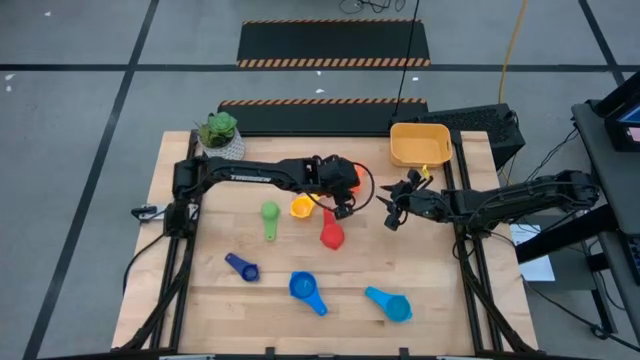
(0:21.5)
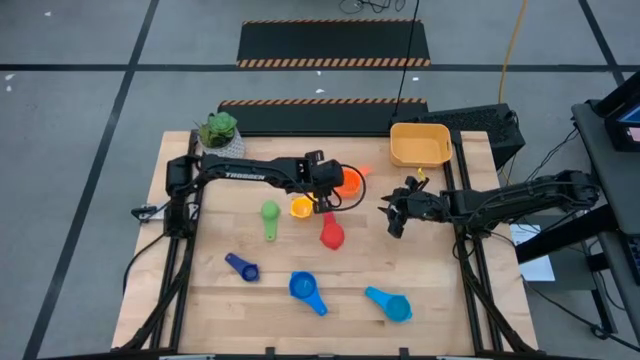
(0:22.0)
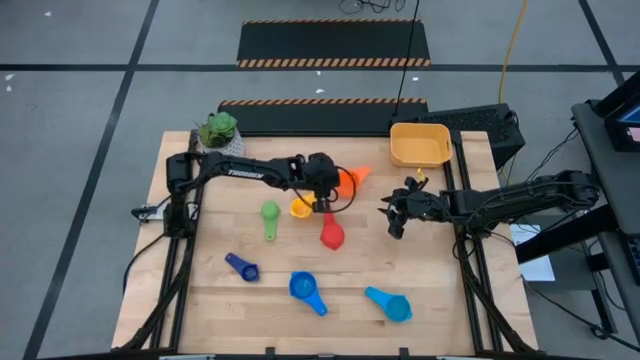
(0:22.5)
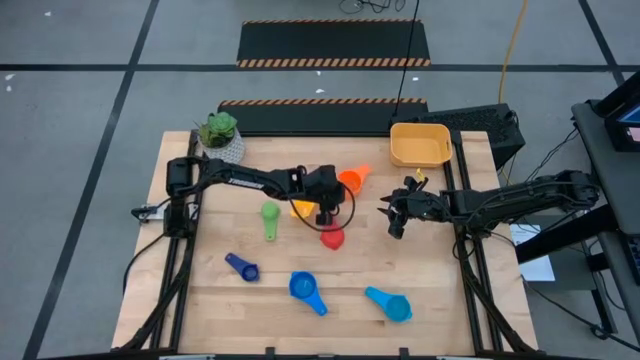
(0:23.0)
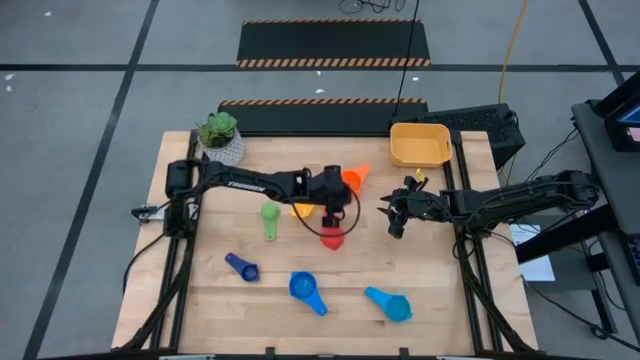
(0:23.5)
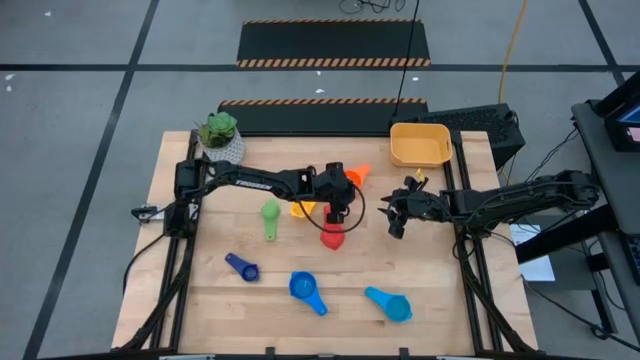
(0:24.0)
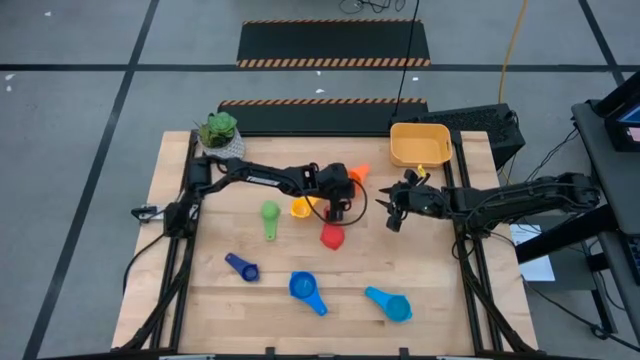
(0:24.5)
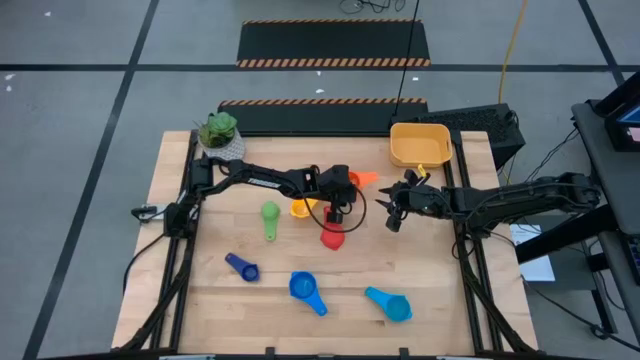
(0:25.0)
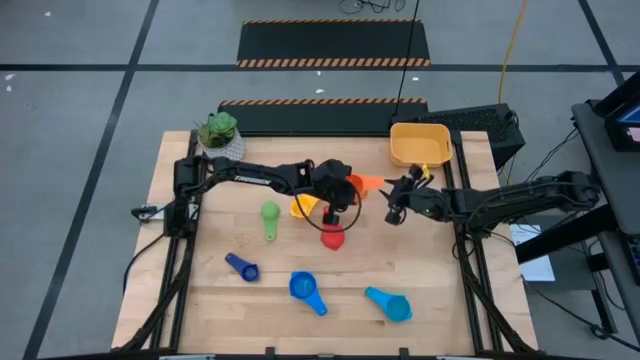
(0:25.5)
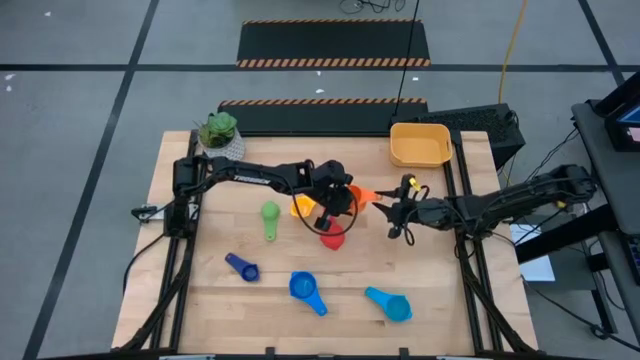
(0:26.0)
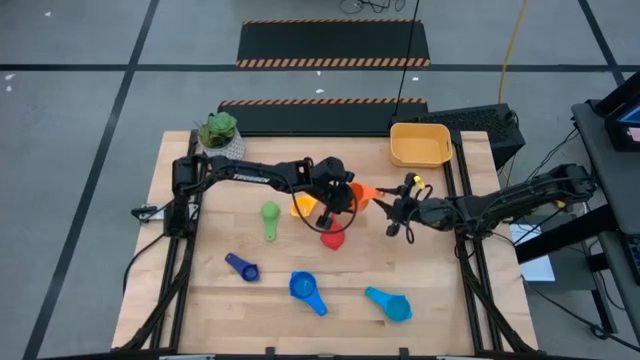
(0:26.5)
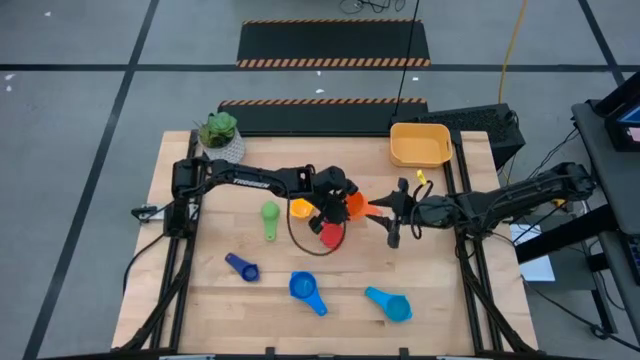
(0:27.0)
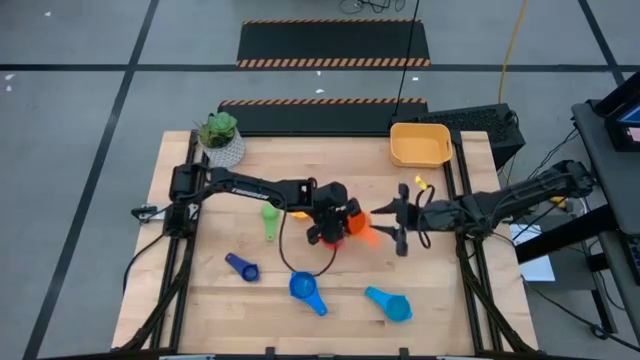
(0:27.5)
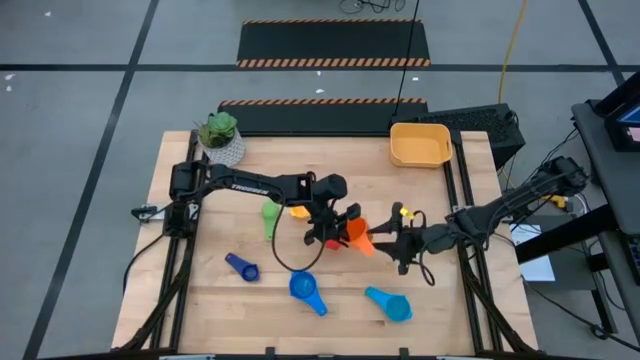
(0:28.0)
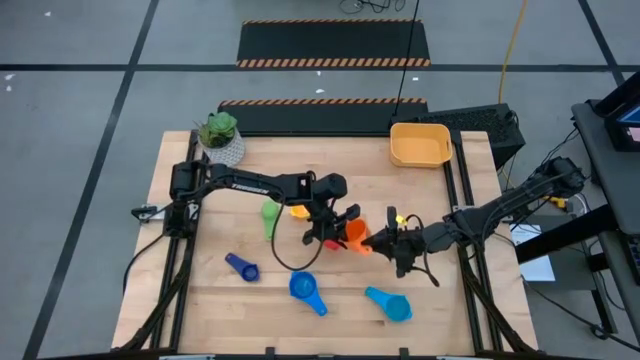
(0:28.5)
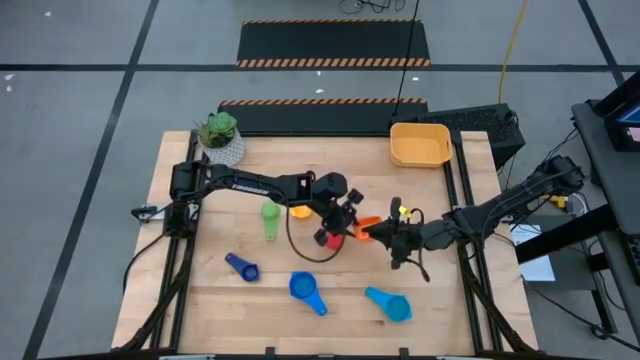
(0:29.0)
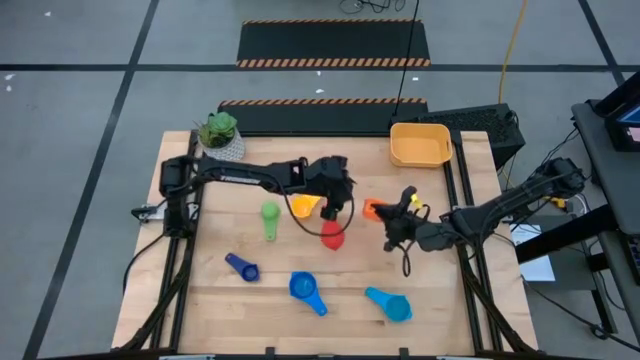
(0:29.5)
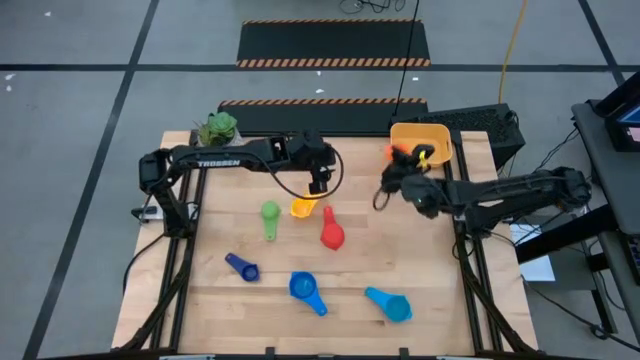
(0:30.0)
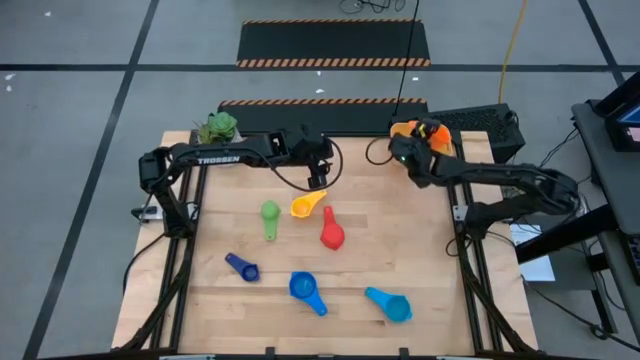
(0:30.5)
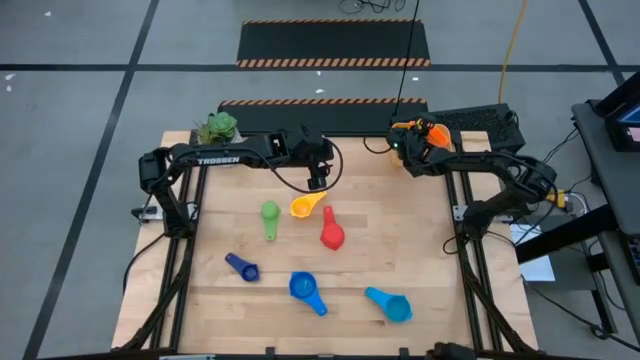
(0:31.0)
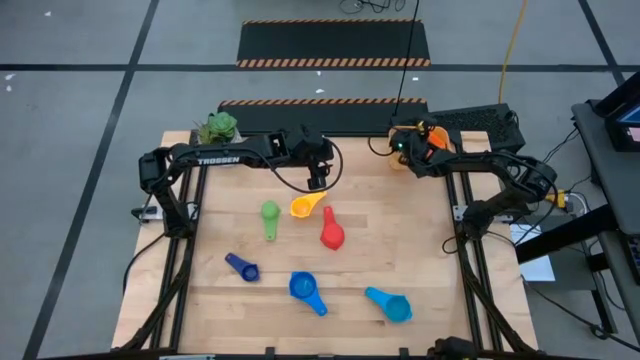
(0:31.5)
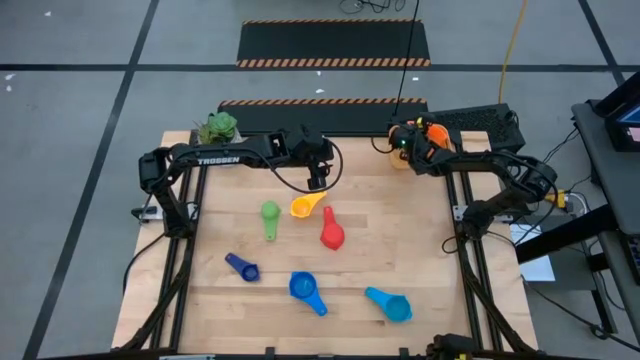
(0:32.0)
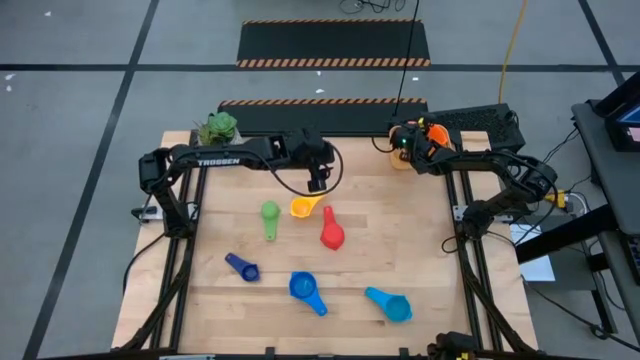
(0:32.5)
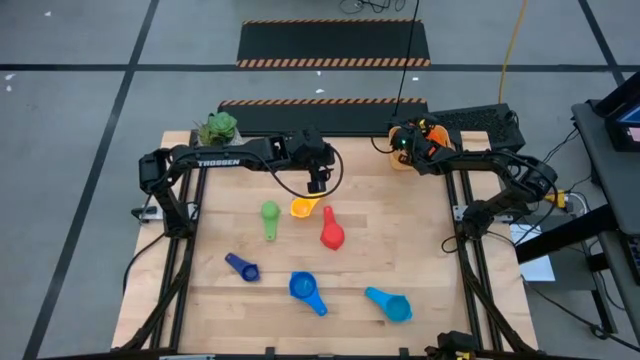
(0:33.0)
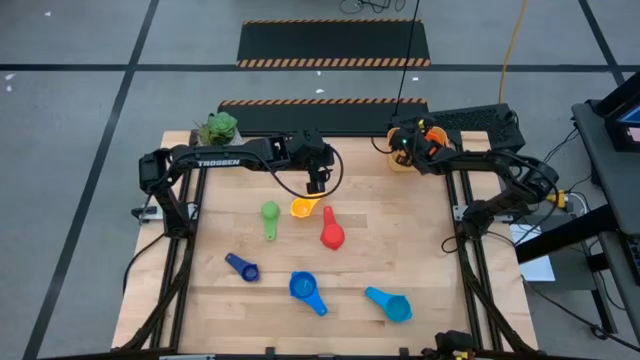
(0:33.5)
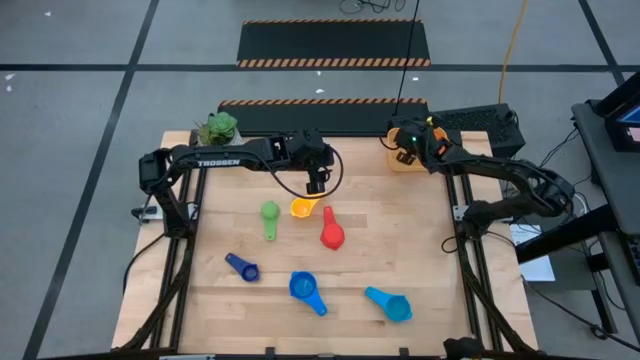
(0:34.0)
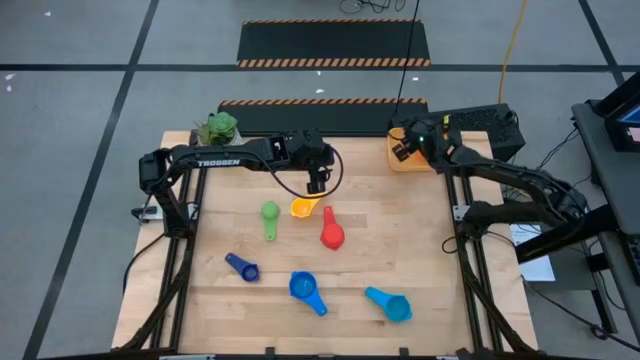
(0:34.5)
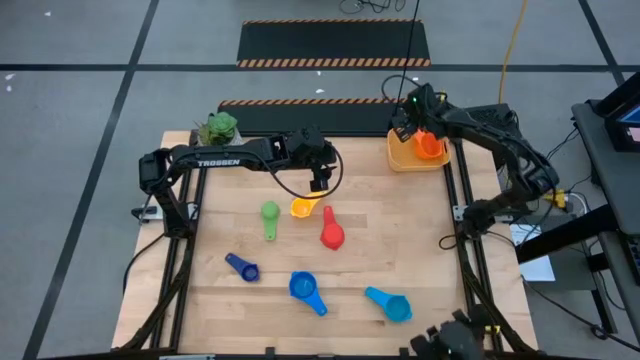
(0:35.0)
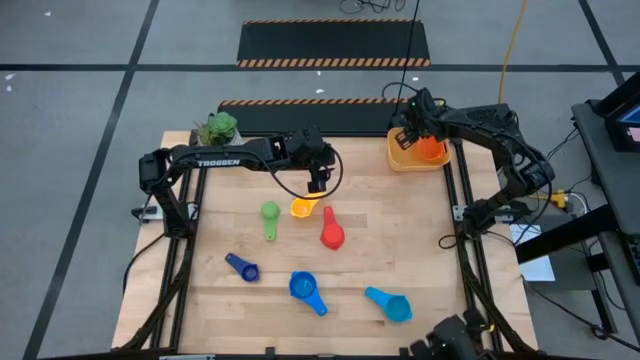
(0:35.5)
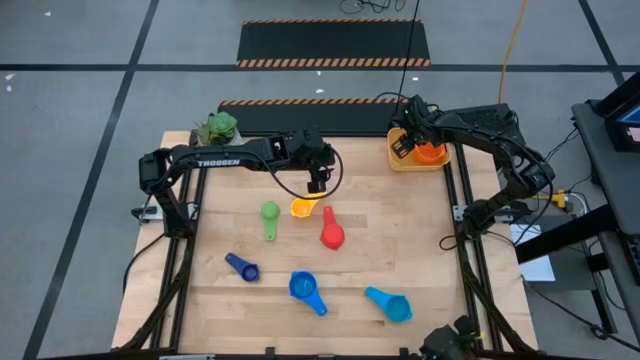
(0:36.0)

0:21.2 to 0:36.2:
Task: Nest measuring cups in basket
Put the orange measuring cup into the yellow bin

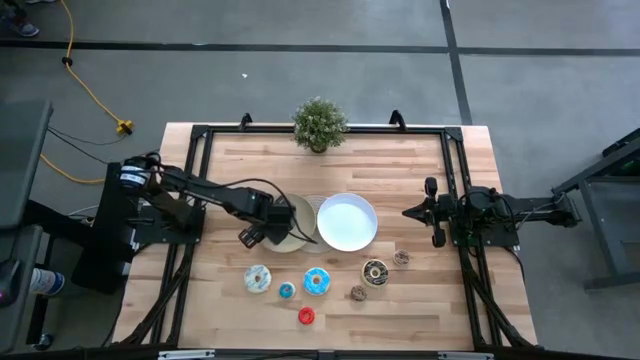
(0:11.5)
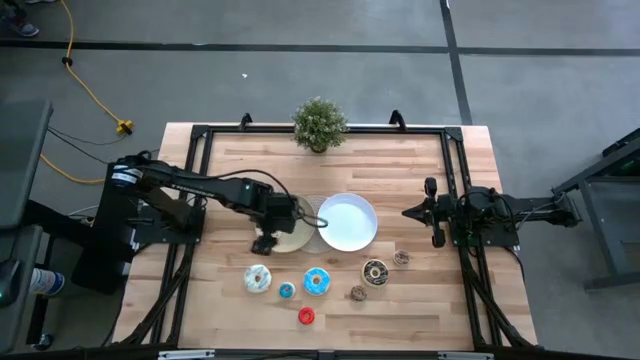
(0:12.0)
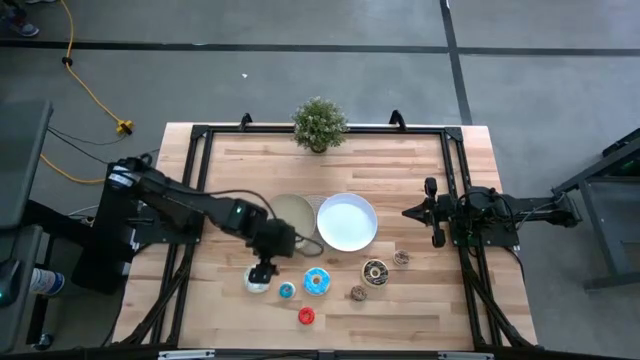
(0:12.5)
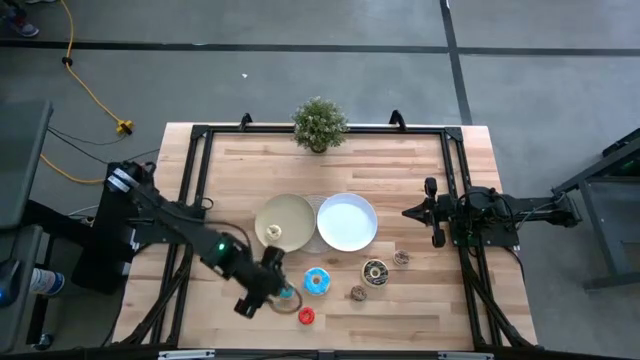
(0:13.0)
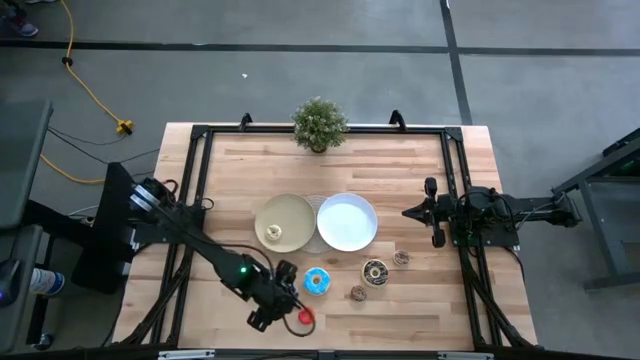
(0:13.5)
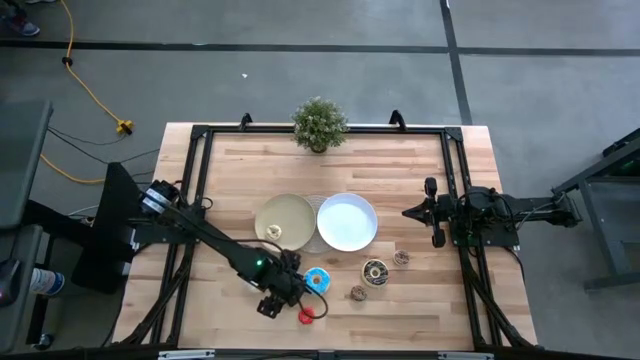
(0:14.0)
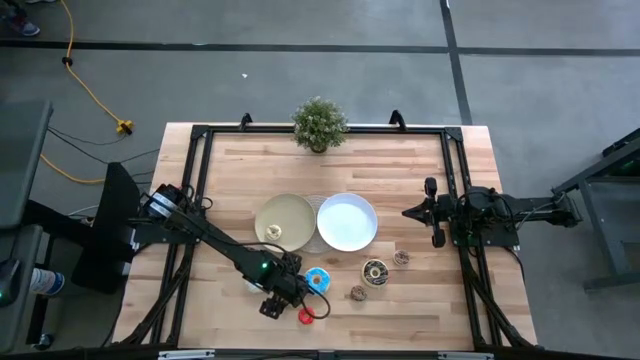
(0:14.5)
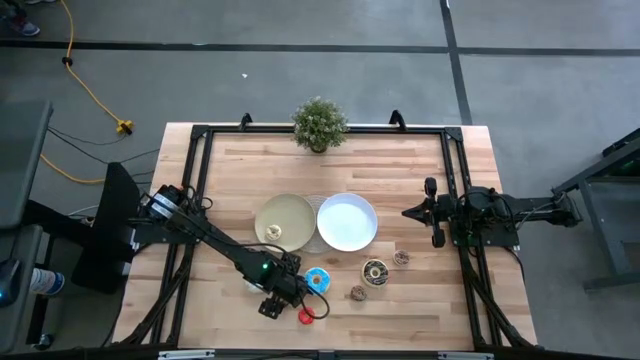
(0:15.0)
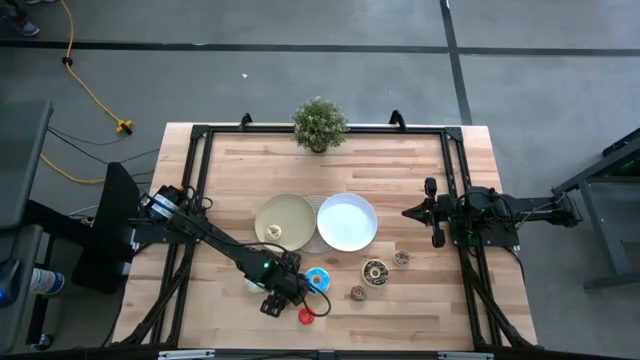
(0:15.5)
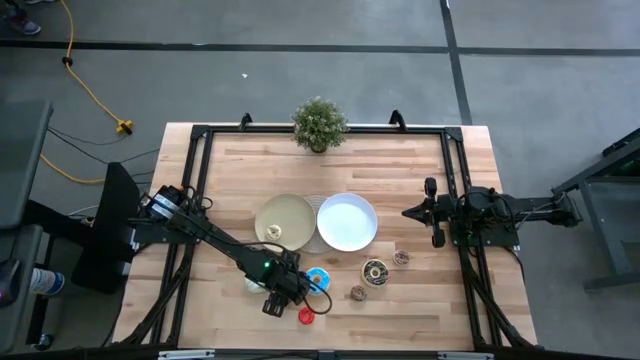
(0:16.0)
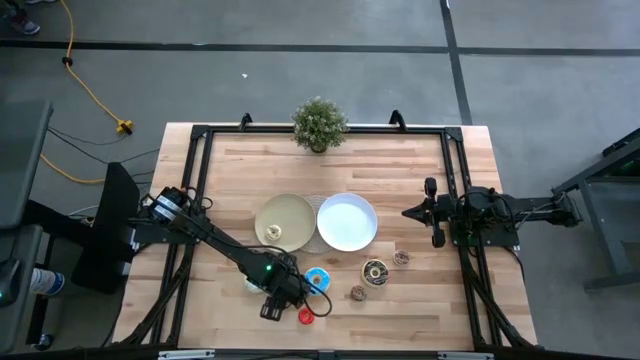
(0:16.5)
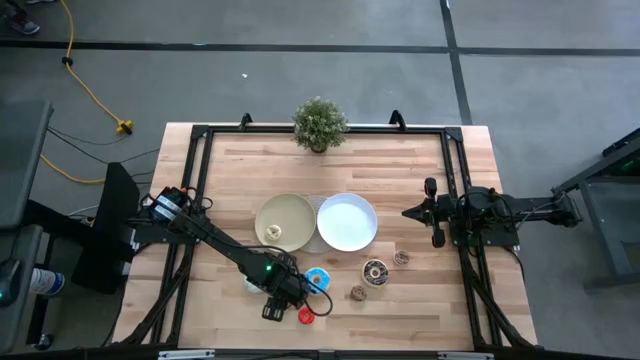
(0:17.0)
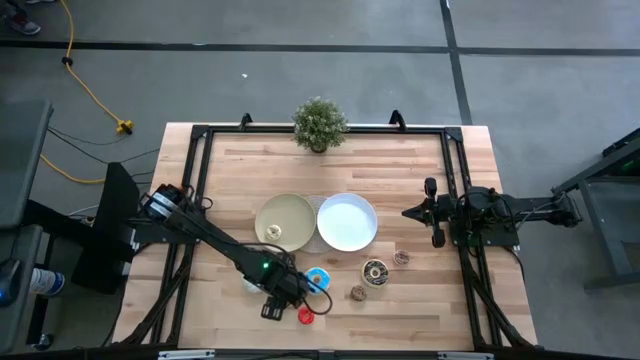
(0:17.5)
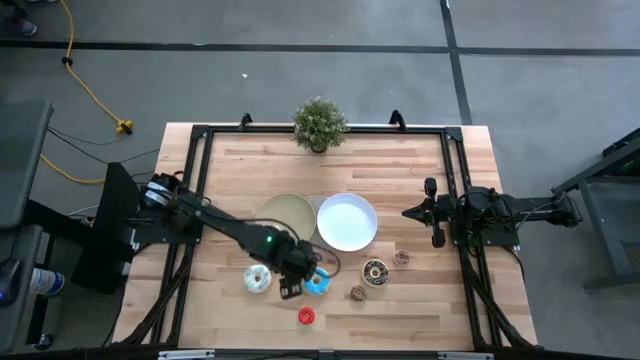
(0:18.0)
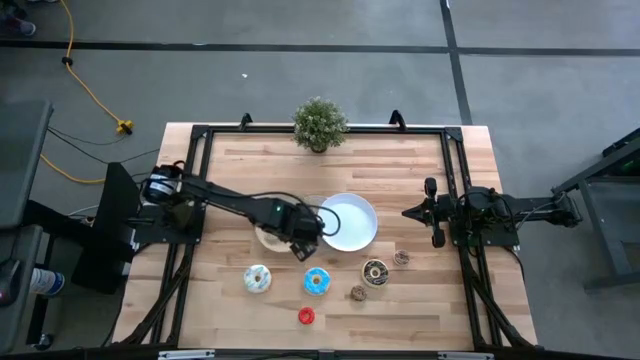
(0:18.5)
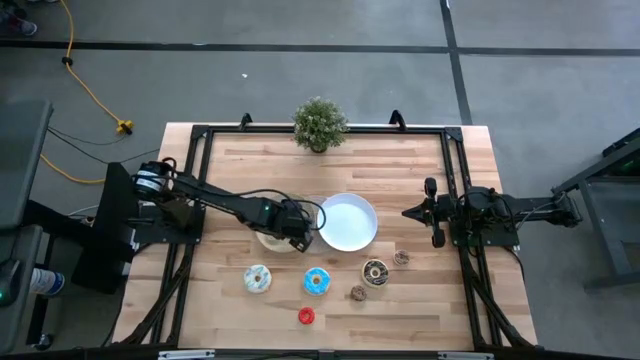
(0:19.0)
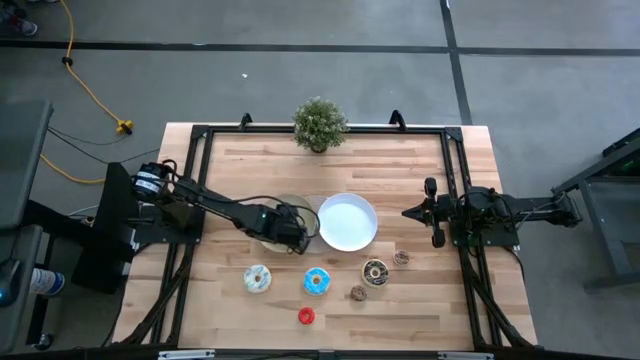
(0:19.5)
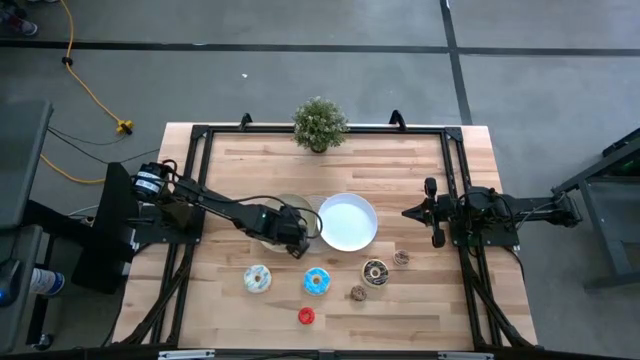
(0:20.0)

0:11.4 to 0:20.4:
Task: Pick & Place donuts
Put the small blue donut on the brown plate
